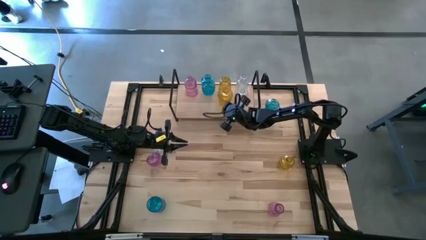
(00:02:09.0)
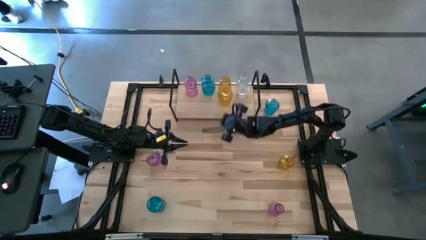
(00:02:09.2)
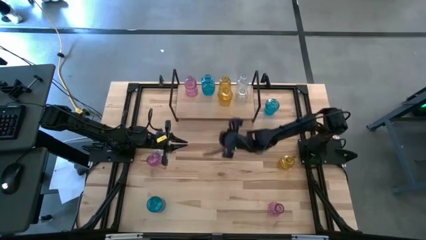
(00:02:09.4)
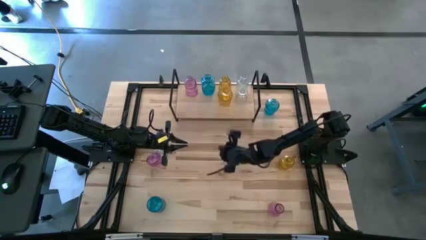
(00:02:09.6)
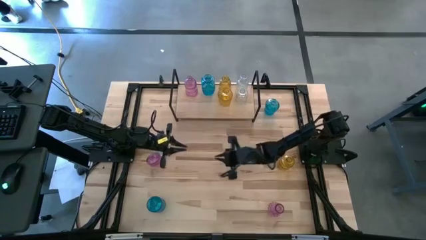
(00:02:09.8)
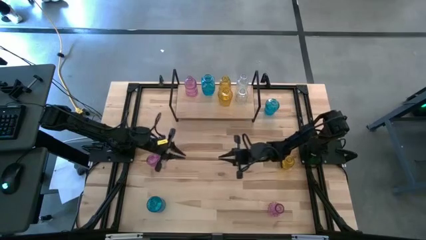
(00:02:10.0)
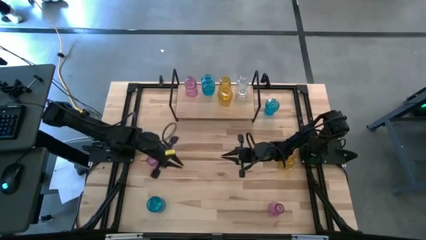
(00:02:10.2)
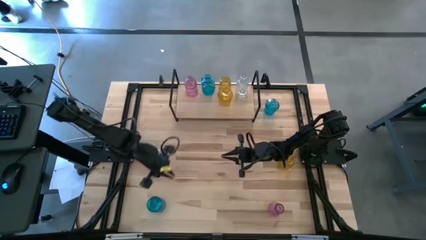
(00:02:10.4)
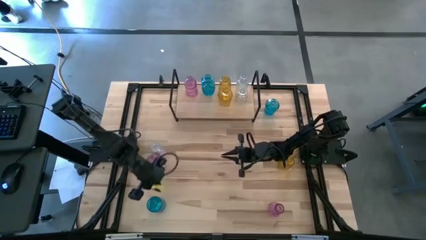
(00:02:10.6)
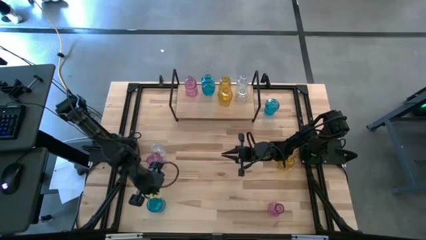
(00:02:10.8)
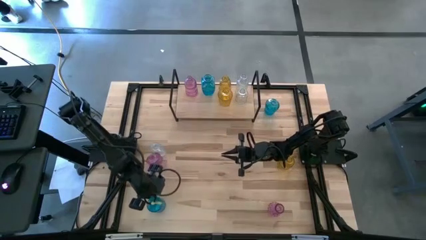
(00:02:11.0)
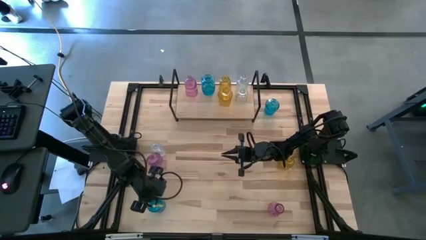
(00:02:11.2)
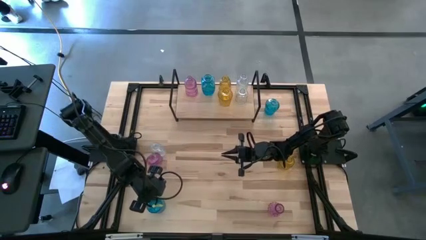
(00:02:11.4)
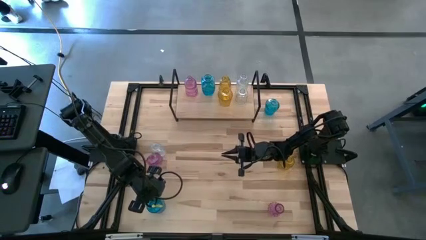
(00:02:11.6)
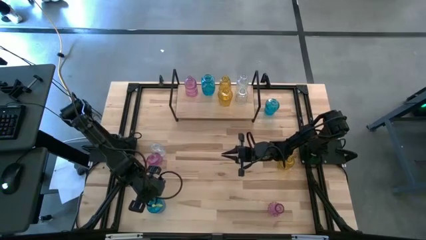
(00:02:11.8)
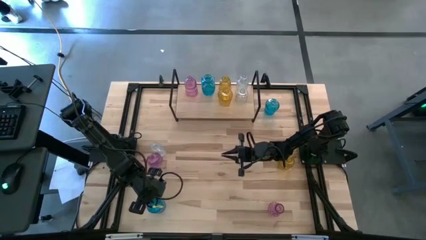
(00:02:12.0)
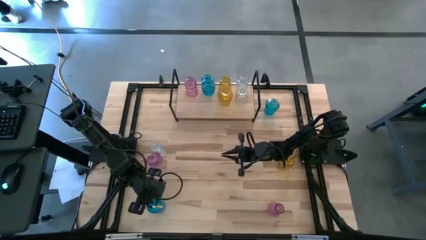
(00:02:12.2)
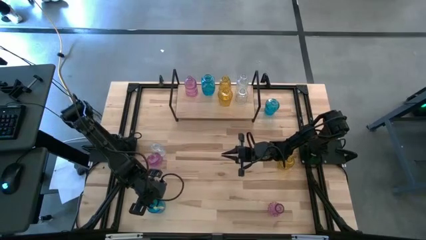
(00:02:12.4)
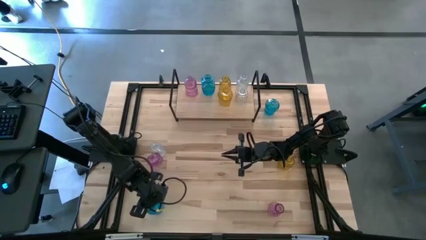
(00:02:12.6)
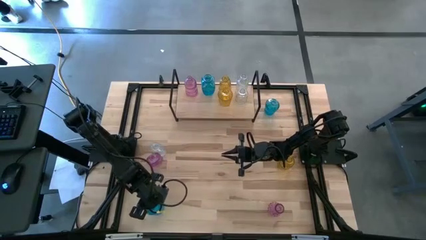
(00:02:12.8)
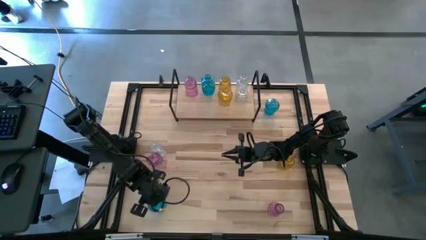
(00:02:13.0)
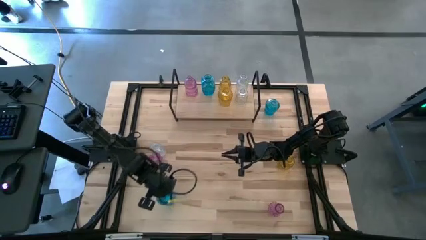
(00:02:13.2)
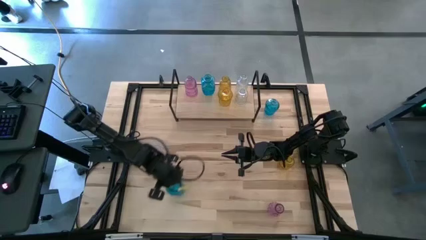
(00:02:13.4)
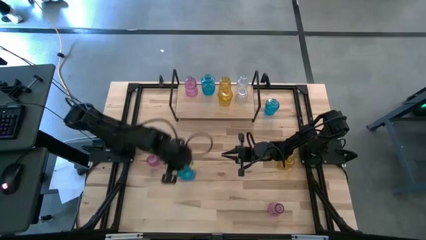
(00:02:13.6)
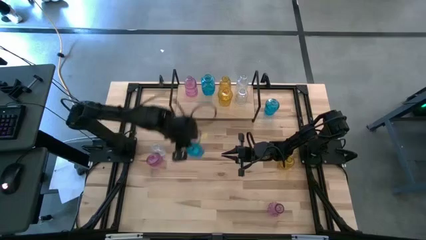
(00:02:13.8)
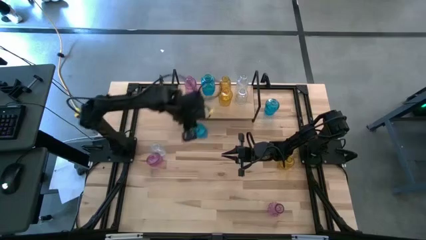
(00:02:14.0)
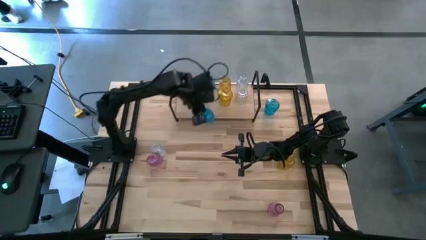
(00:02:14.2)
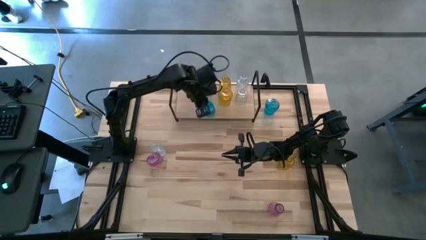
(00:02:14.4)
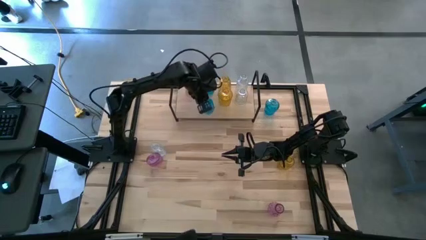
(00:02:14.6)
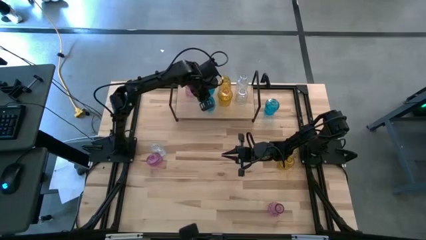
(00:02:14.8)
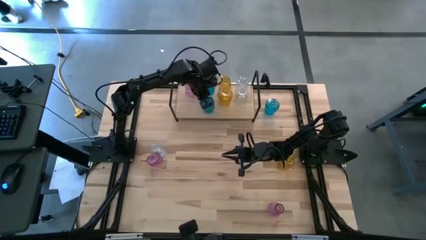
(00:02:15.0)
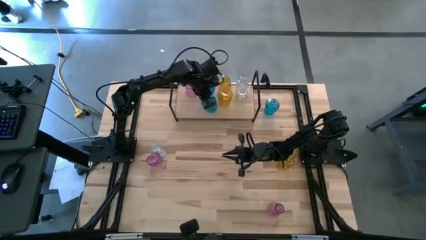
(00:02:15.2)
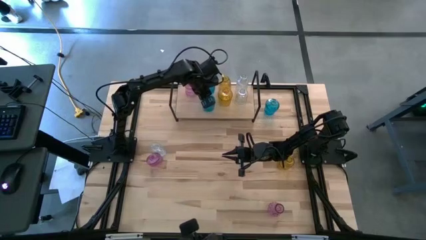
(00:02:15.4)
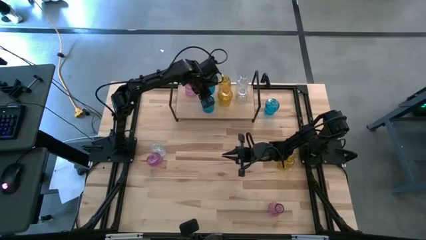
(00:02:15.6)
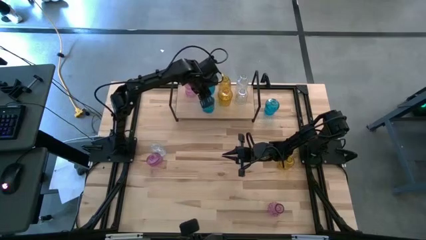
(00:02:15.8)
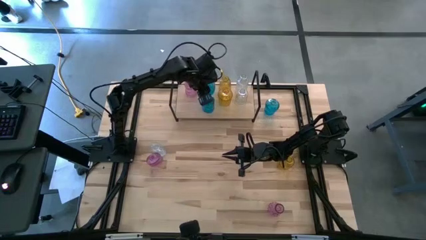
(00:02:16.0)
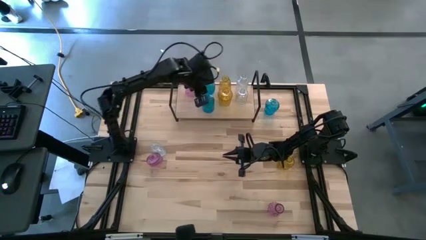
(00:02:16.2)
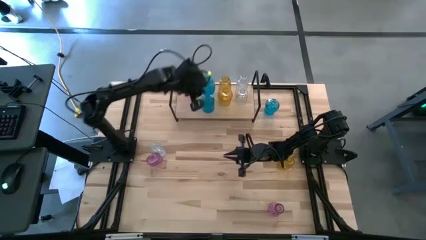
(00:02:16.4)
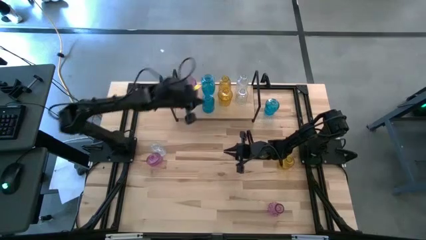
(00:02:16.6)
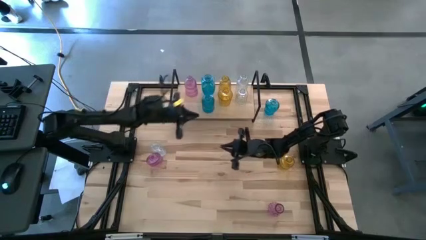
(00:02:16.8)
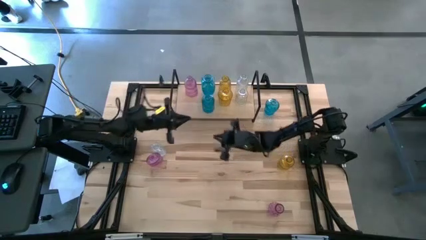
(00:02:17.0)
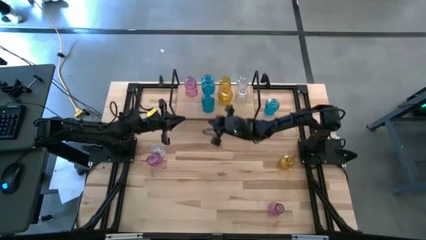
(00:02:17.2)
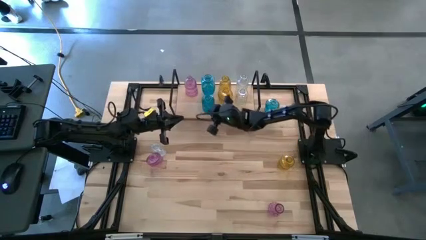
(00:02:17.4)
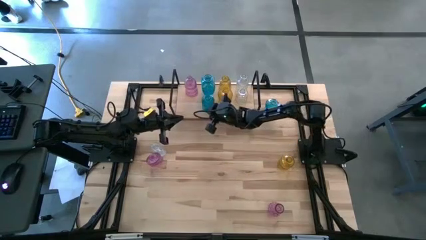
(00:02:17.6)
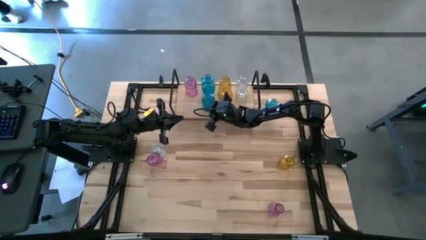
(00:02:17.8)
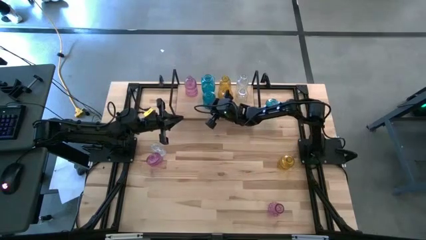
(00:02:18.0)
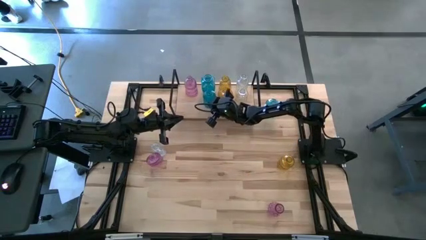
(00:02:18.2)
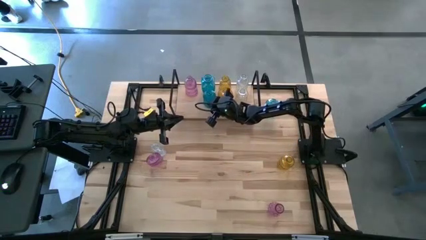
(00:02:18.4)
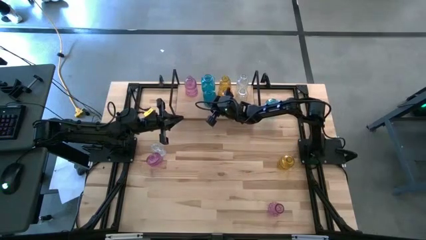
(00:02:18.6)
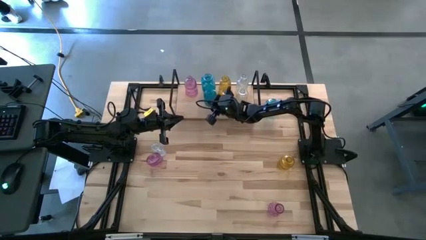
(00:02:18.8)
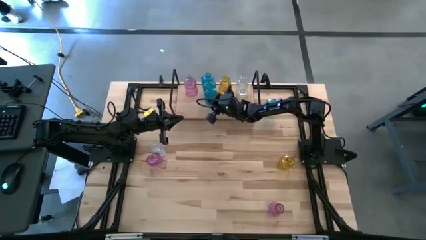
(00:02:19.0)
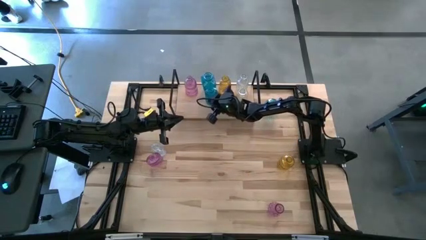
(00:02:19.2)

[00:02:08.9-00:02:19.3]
Task: sort vases onto shelf
Put the bottom blue vase on the shelf aligned with the blue vase

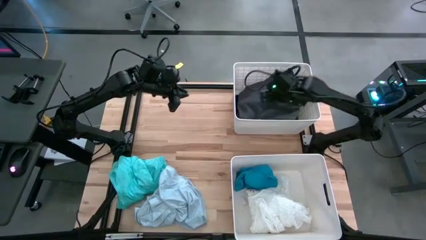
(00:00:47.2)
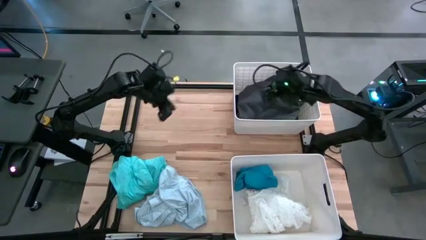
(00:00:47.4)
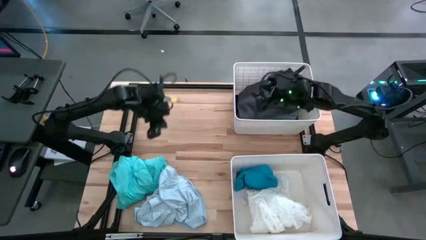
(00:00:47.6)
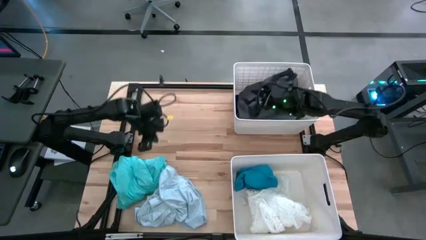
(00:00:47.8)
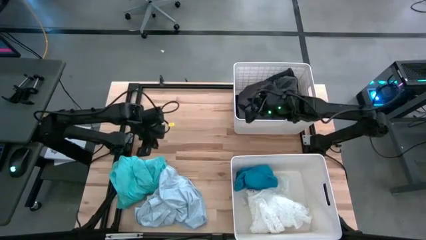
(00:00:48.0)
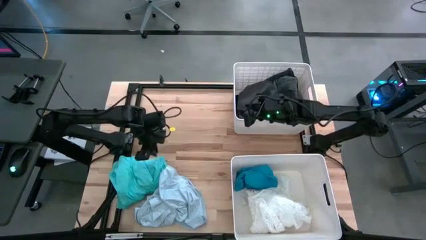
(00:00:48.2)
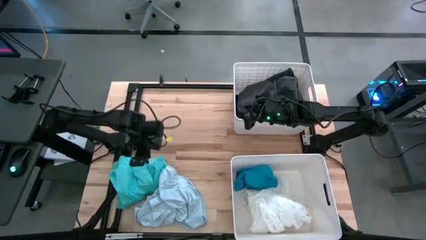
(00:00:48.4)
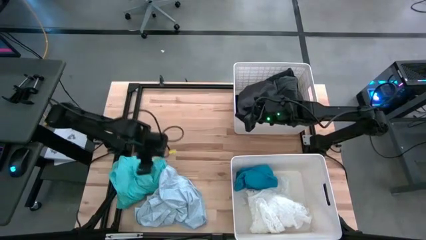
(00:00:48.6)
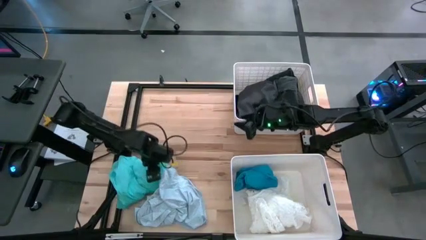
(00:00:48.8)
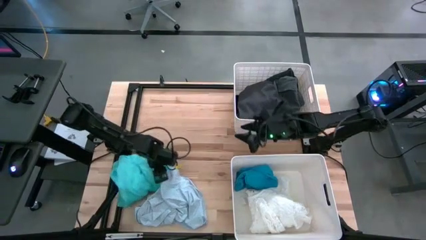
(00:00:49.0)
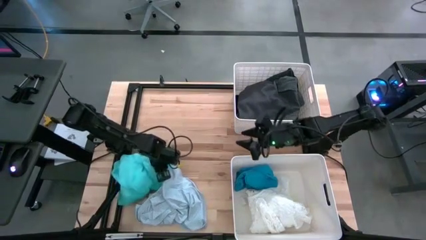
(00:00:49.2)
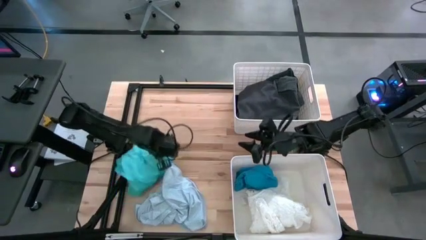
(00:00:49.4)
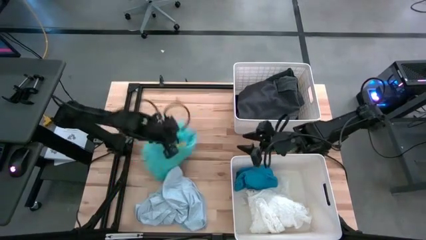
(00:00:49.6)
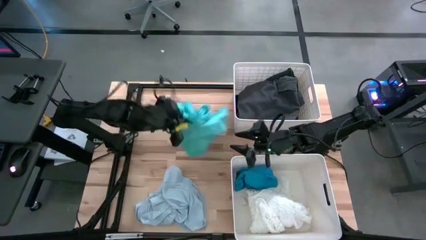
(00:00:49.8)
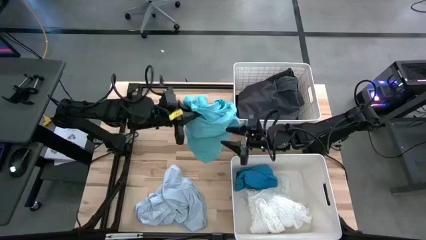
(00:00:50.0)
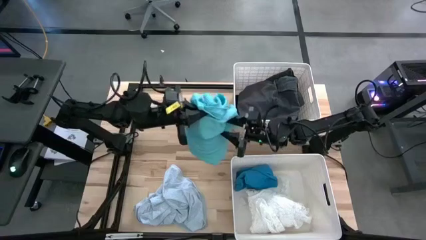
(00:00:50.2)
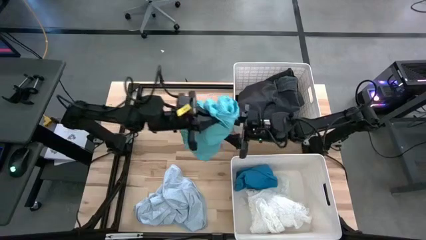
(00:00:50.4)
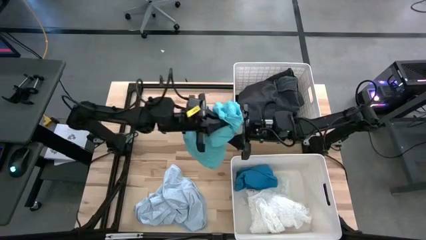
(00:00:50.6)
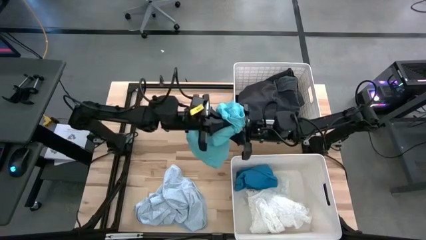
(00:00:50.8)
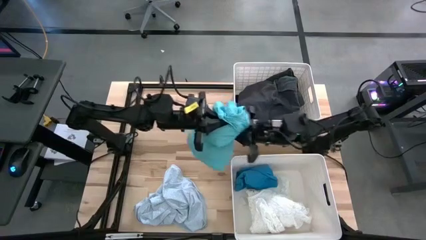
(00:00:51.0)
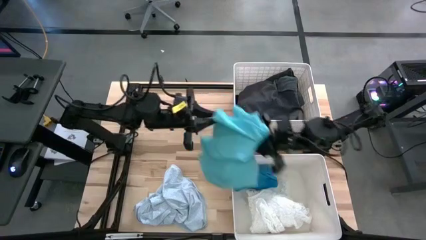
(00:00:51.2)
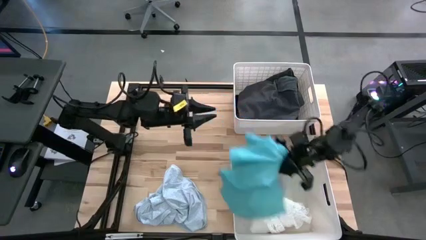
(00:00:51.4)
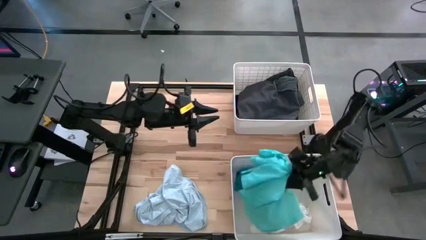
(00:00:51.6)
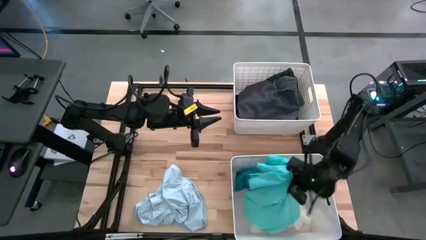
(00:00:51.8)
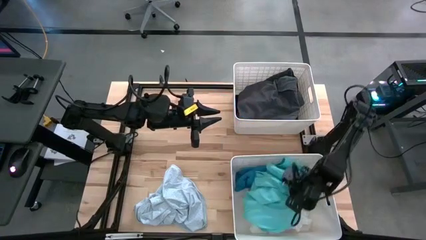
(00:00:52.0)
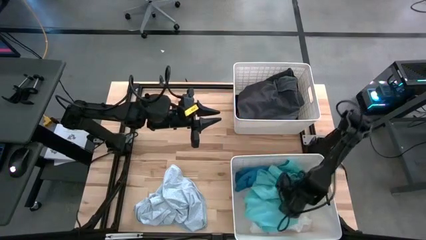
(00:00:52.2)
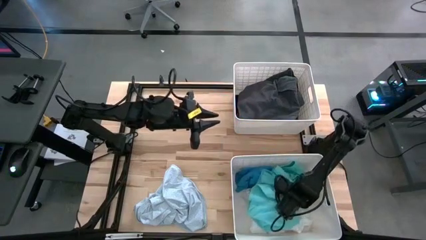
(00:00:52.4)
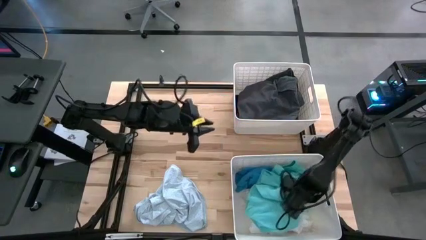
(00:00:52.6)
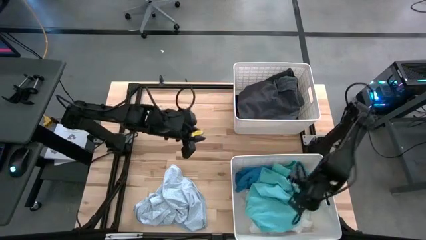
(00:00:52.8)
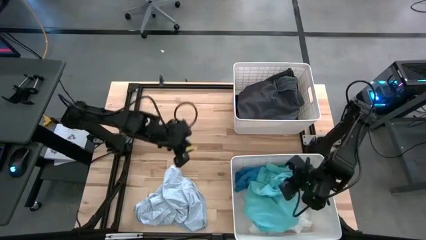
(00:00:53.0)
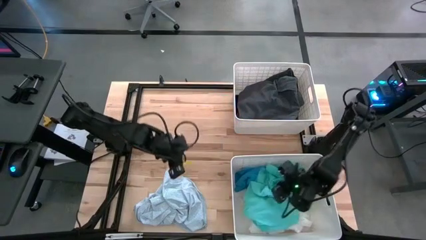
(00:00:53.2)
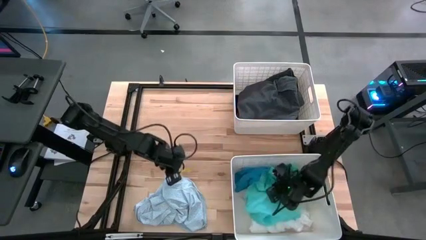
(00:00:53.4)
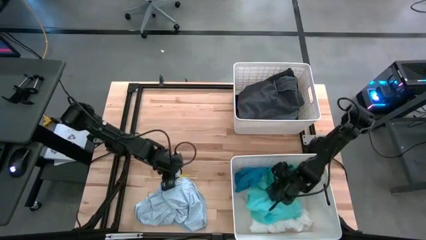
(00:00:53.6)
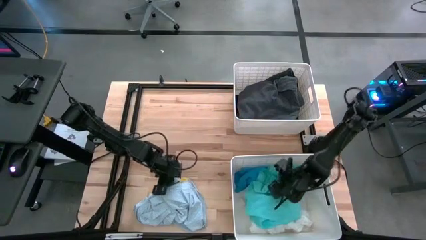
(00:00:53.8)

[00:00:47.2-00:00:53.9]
Task: Sort clothes
Put the light blue short into the bottom white laundry bin
